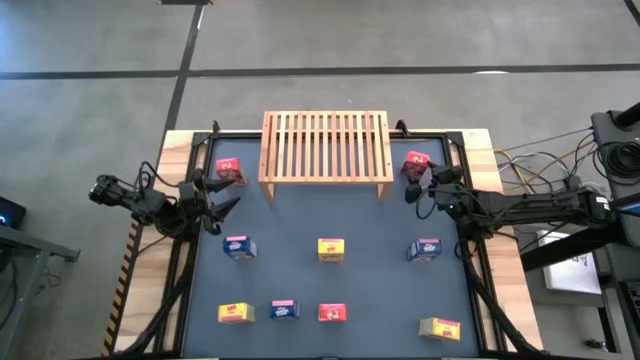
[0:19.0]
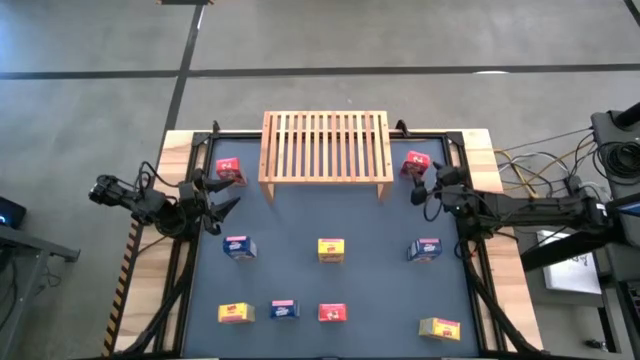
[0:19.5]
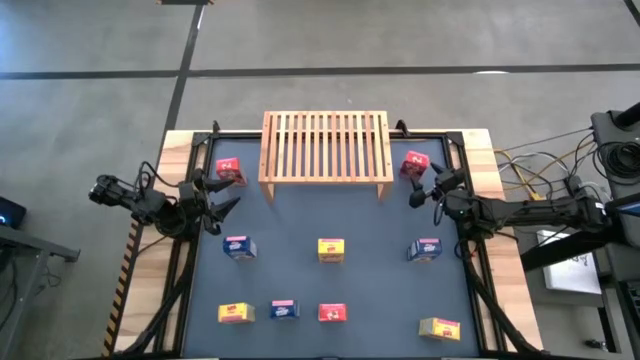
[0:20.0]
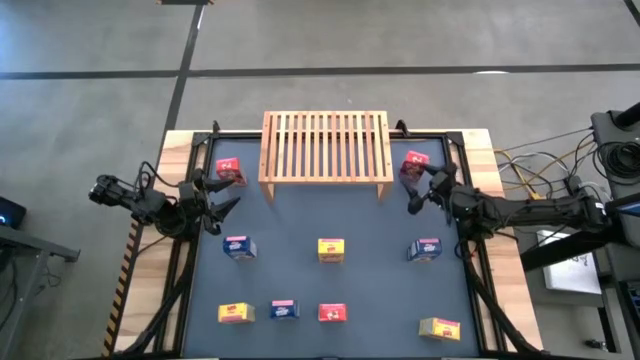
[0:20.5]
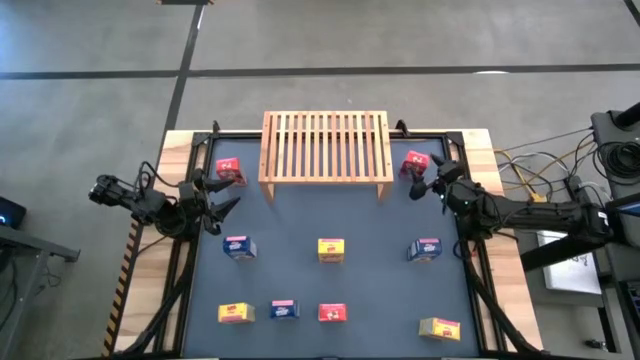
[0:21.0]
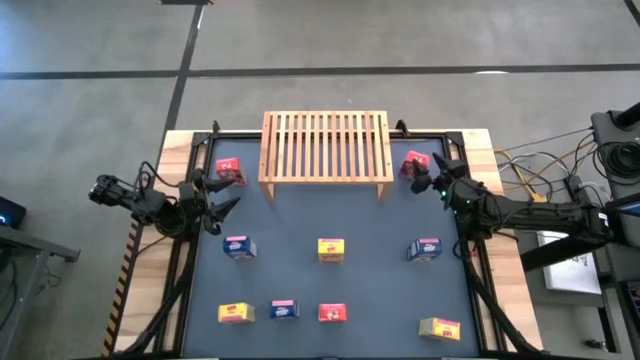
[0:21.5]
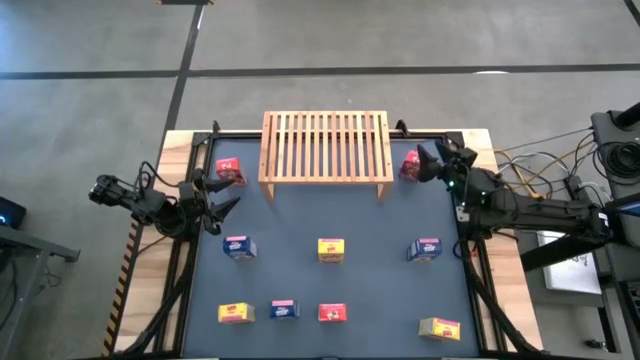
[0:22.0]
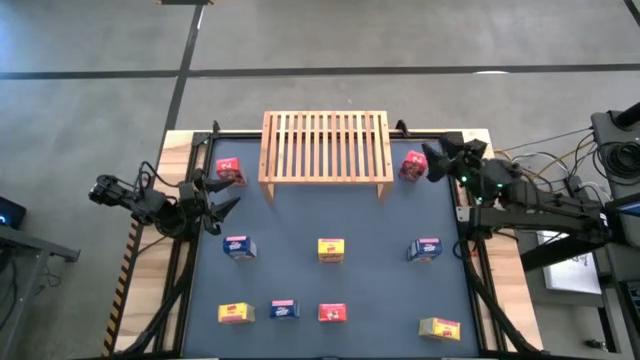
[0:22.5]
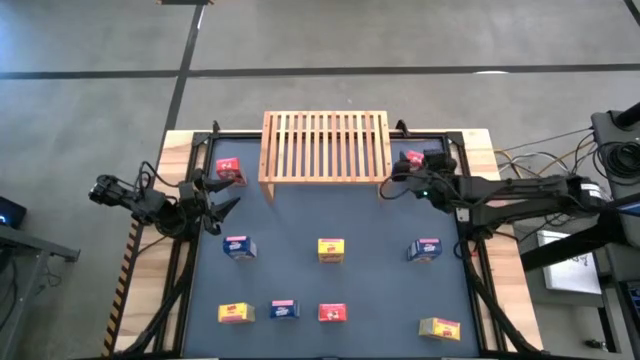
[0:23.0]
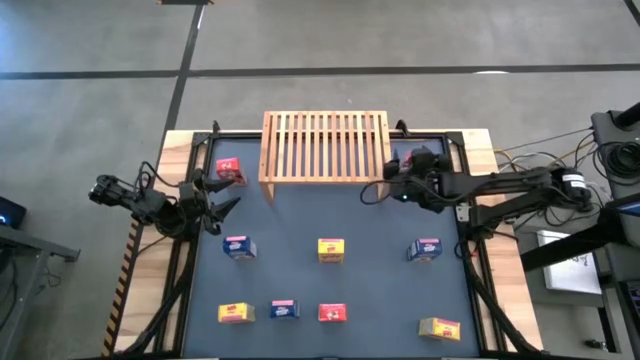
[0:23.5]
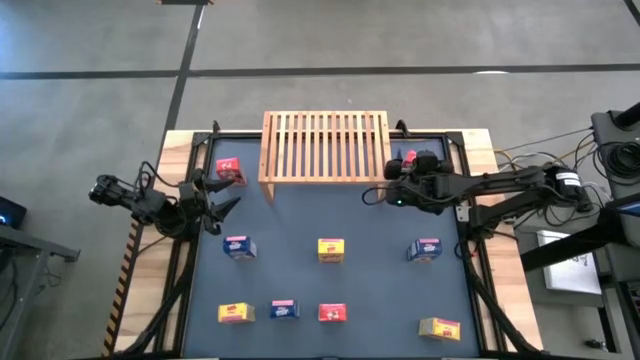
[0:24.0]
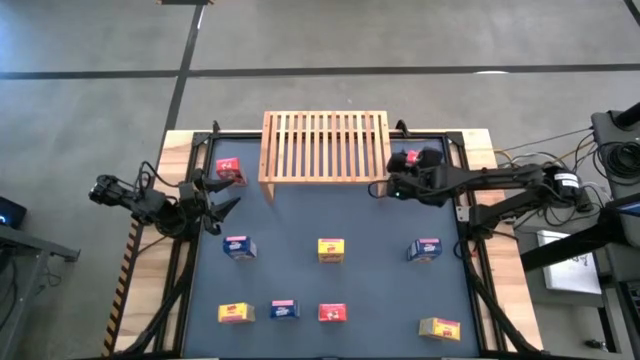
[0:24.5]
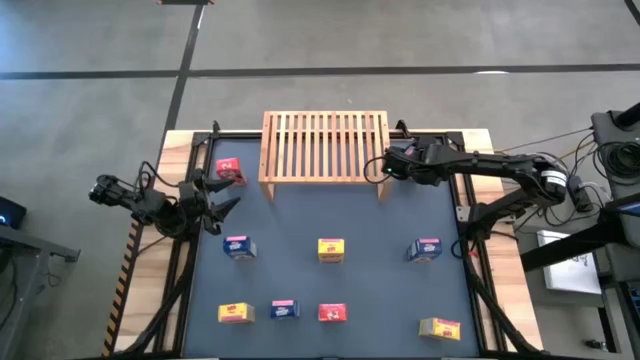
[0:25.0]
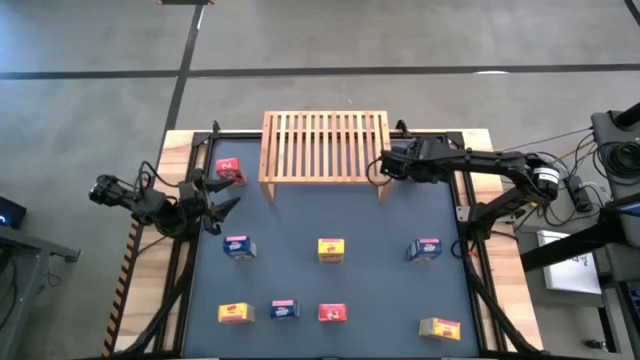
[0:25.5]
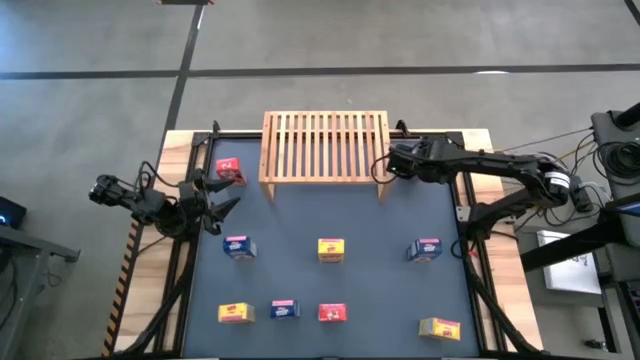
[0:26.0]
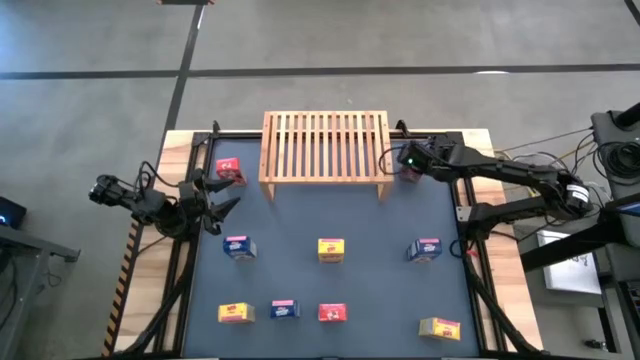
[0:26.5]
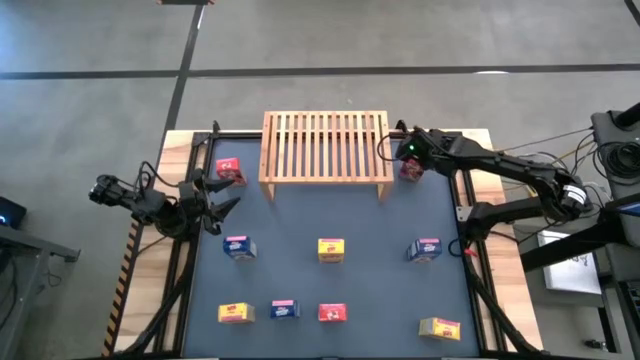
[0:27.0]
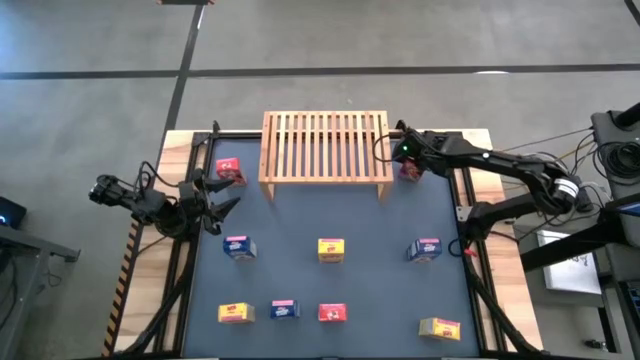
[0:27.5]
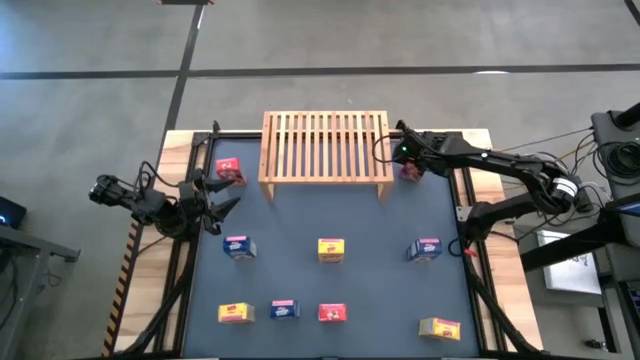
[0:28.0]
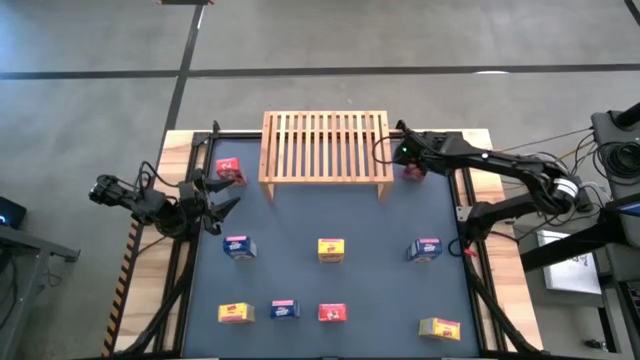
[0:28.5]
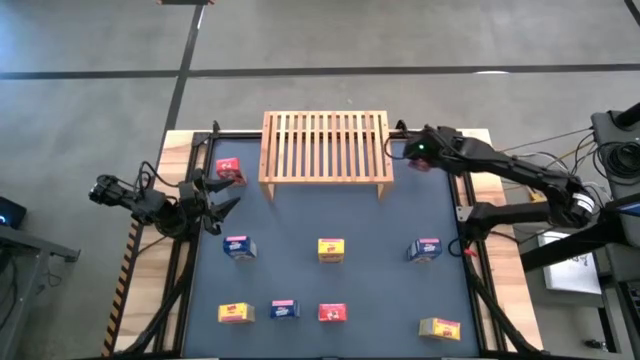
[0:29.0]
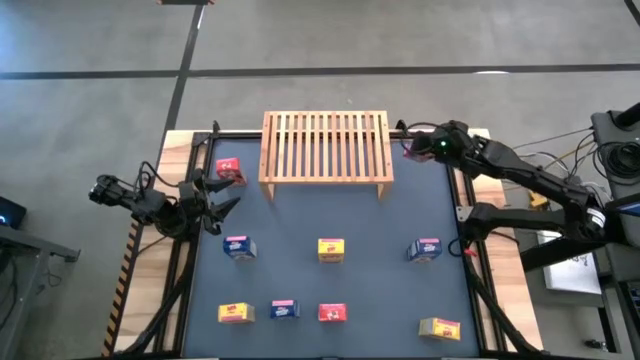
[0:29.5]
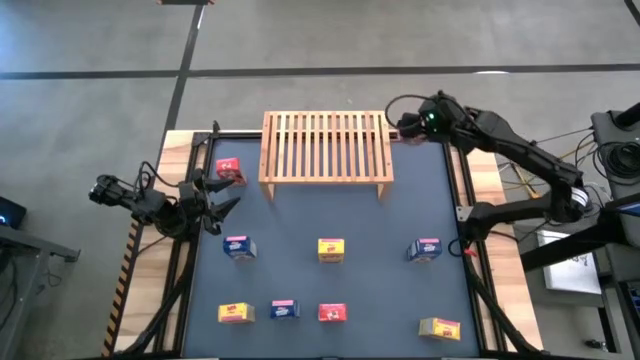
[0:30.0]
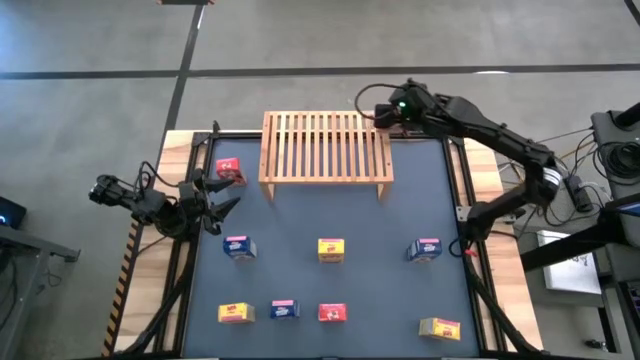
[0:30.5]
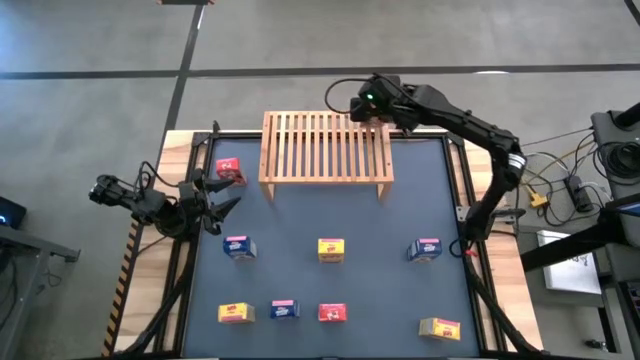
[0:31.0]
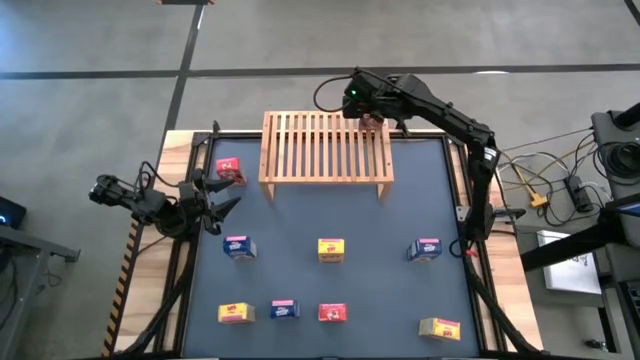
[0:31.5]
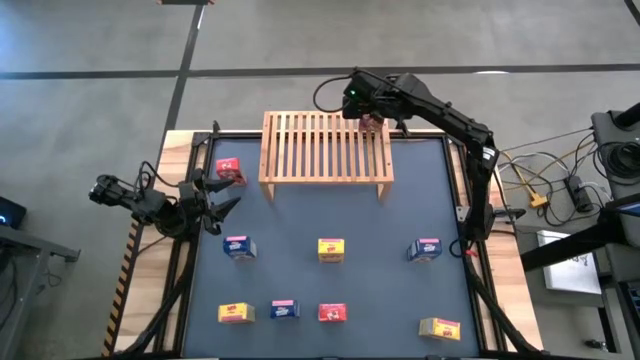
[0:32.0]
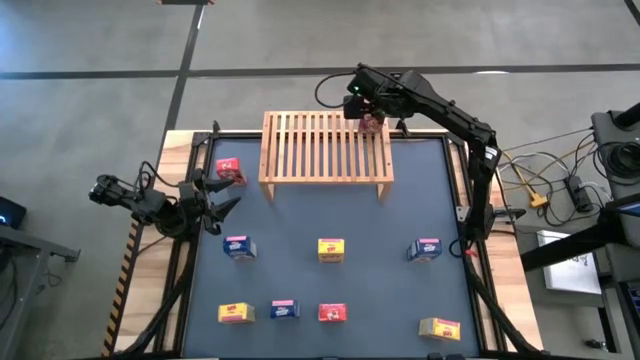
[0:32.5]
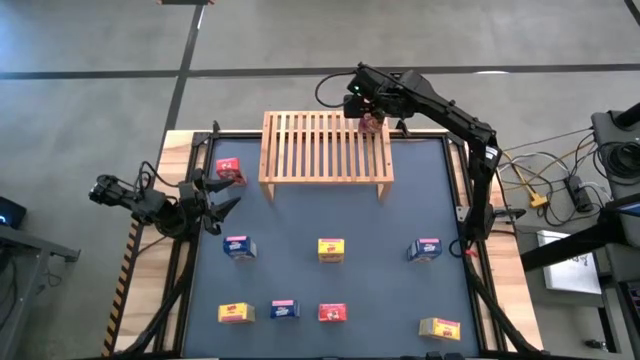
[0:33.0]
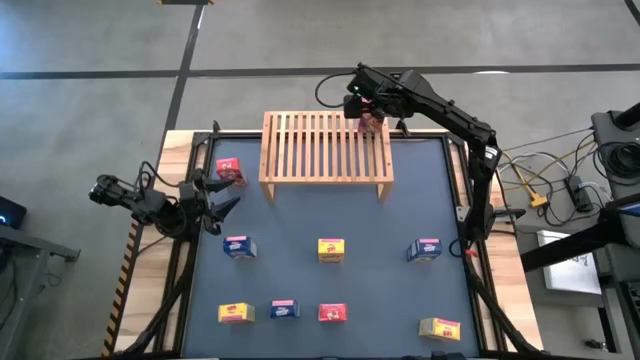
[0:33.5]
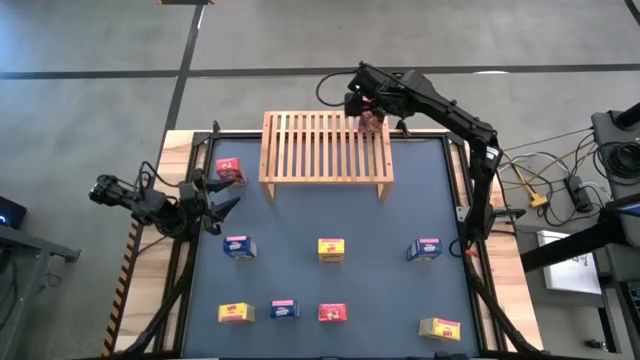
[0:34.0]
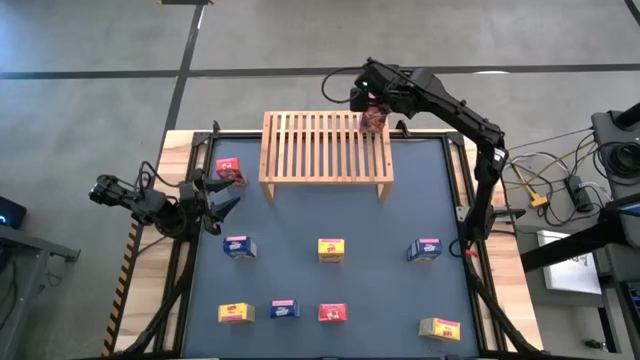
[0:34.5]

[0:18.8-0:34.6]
Task: Stack cereal on shelf
Put the top right red cereal box on the shelf

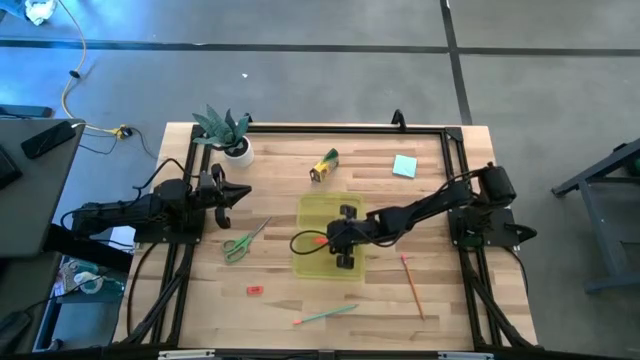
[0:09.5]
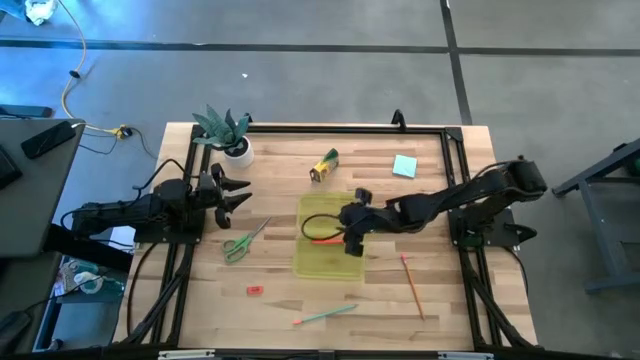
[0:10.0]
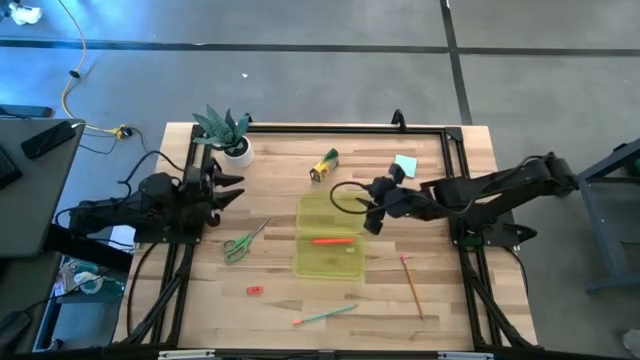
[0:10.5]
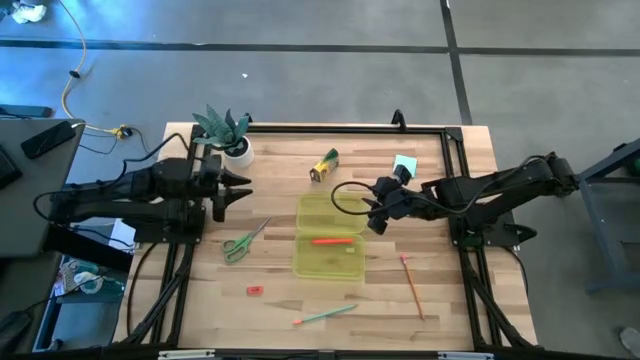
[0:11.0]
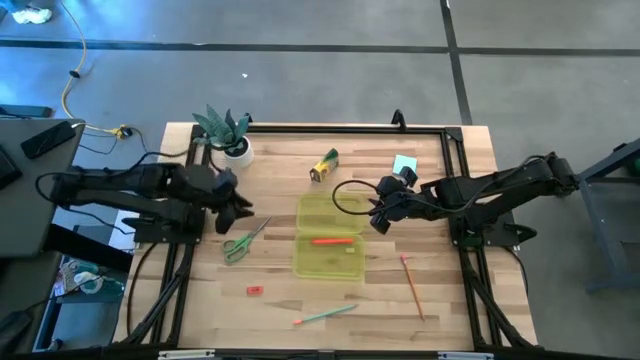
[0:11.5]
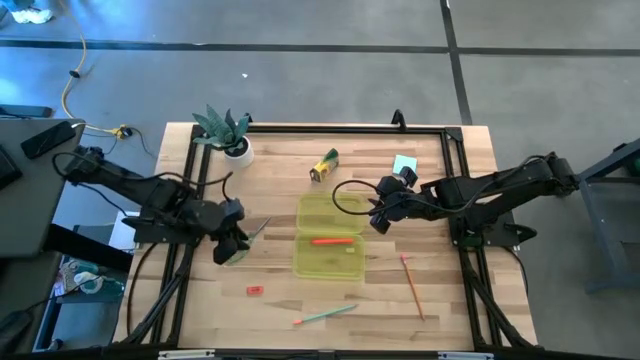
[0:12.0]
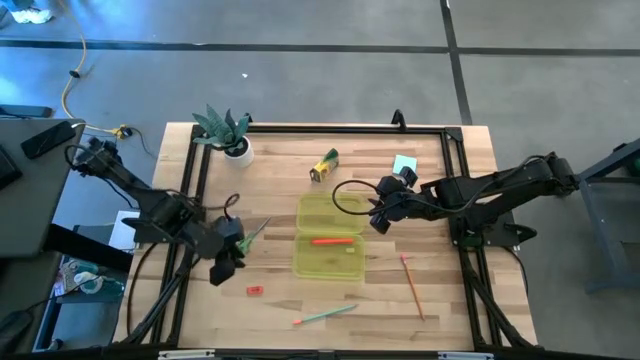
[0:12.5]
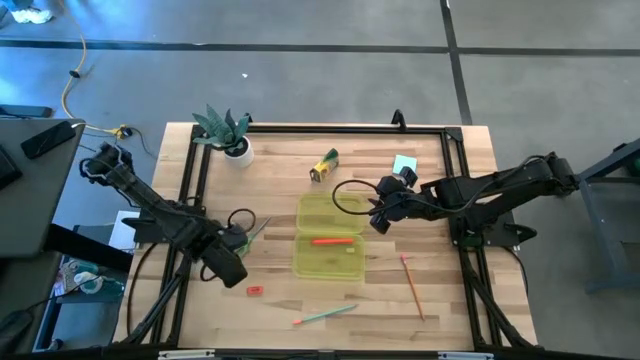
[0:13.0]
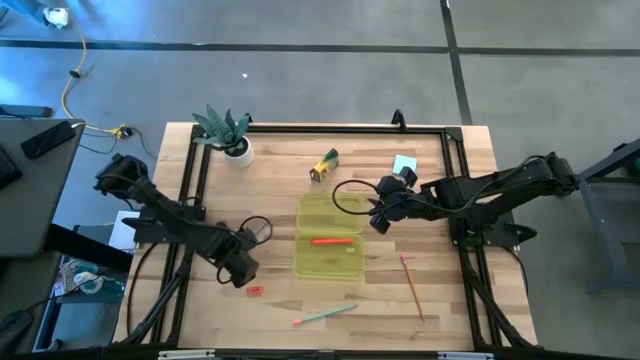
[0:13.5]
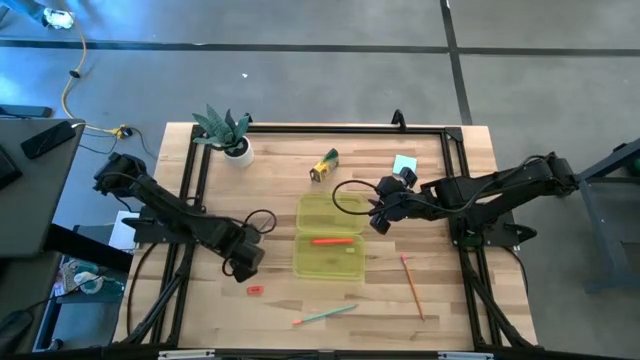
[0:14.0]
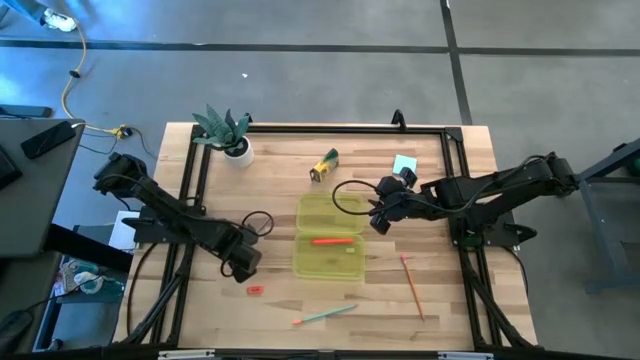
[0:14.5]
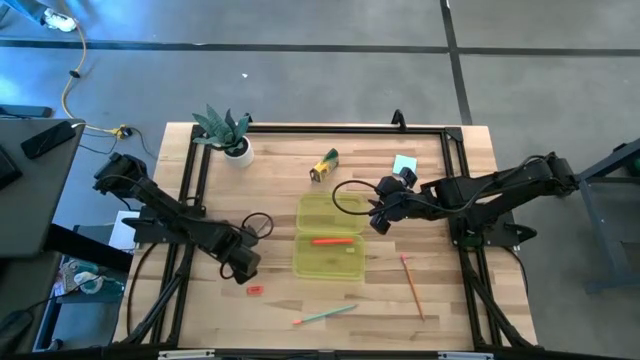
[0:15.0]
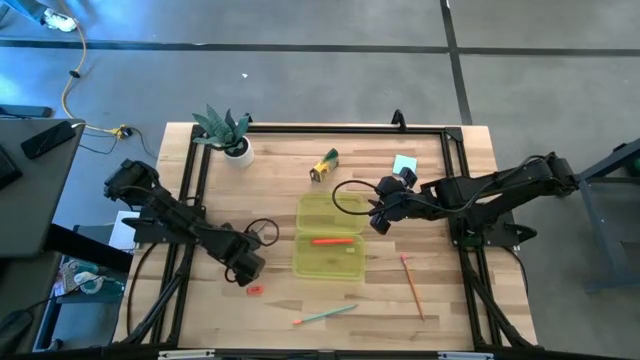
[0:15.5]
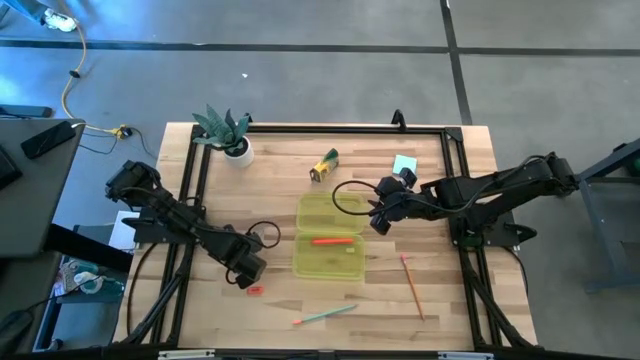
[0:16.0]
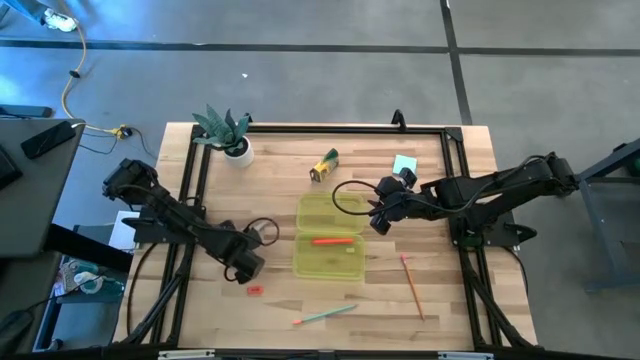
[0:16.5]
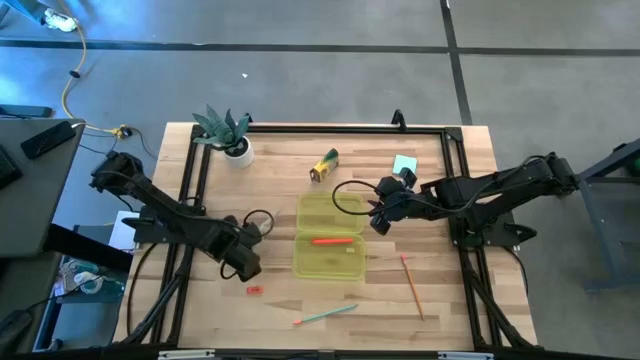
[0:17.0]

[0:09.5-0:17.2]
Task: Pack school essentials
Put the green scissors into the yellow box
